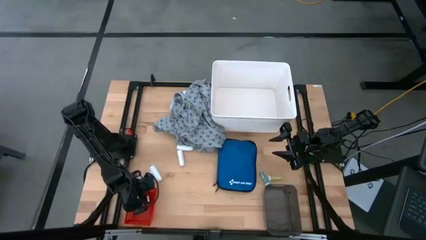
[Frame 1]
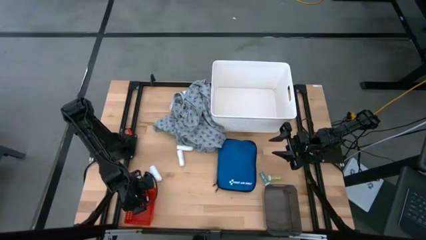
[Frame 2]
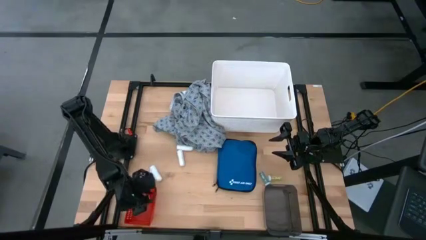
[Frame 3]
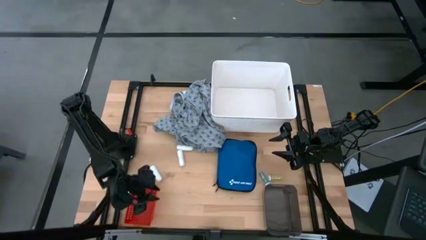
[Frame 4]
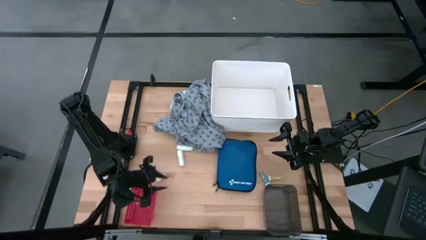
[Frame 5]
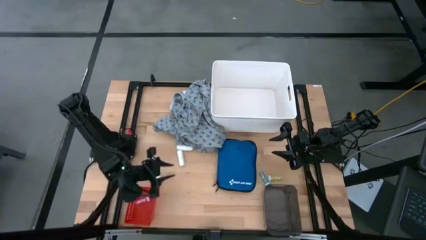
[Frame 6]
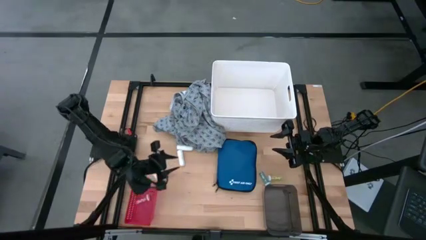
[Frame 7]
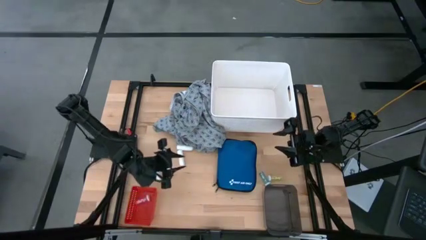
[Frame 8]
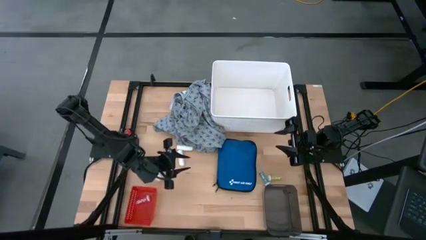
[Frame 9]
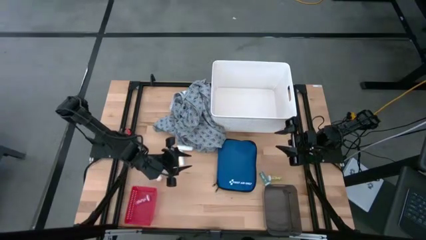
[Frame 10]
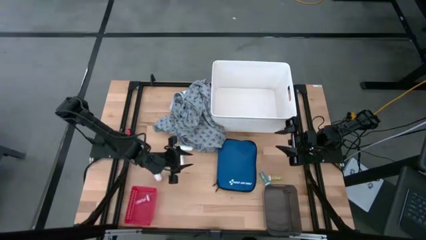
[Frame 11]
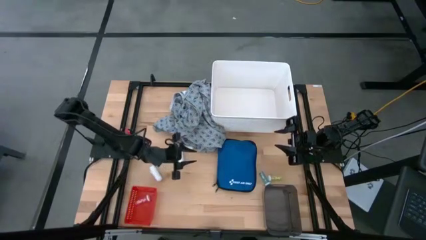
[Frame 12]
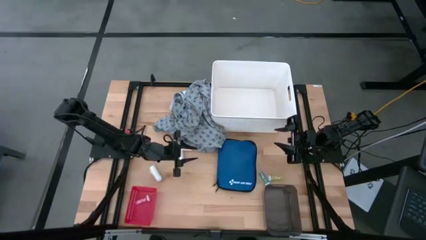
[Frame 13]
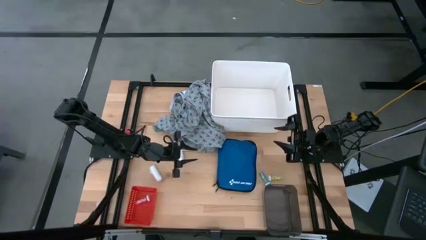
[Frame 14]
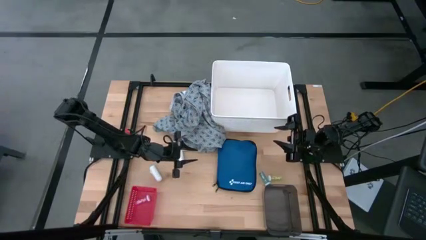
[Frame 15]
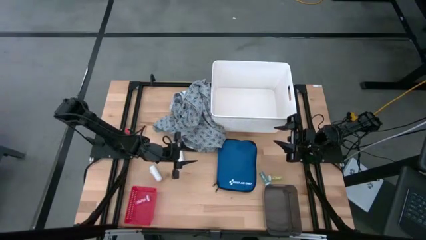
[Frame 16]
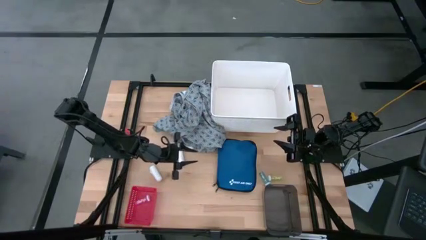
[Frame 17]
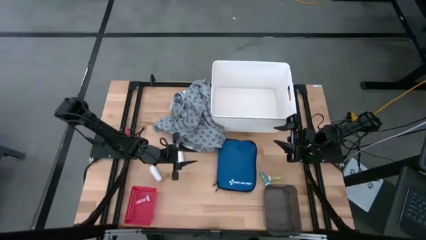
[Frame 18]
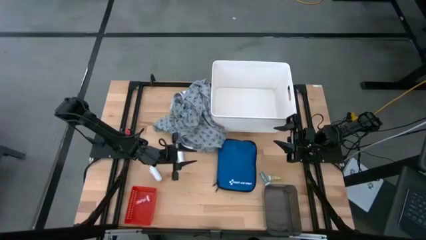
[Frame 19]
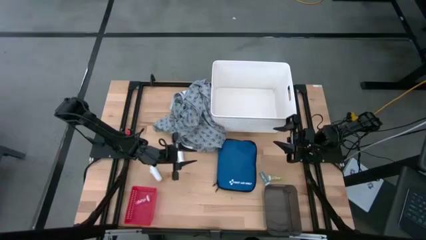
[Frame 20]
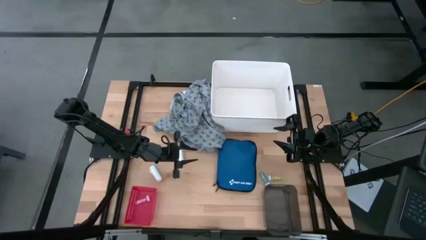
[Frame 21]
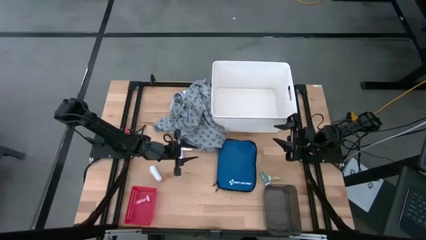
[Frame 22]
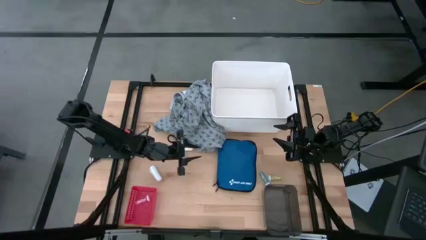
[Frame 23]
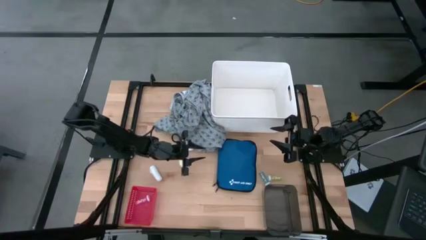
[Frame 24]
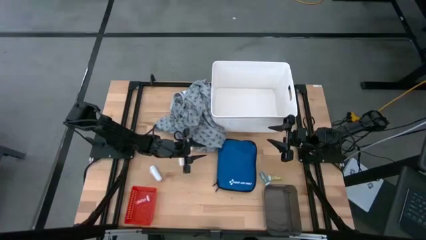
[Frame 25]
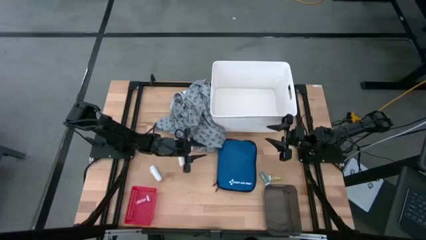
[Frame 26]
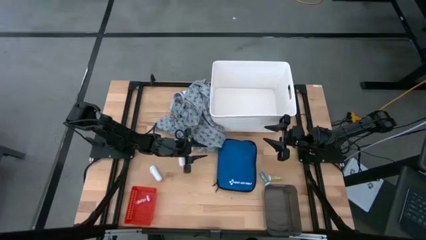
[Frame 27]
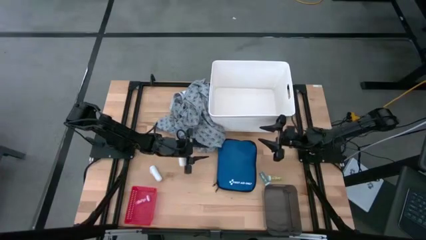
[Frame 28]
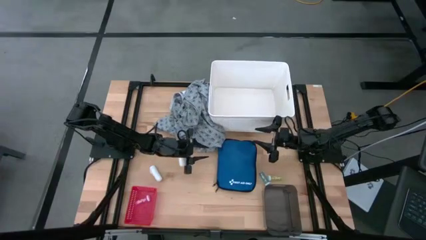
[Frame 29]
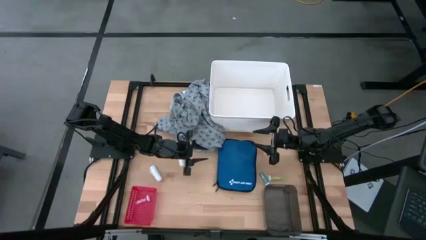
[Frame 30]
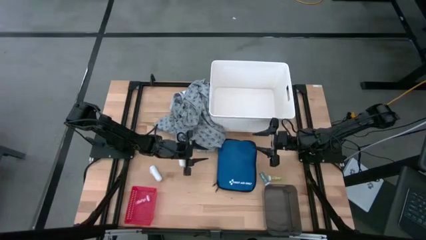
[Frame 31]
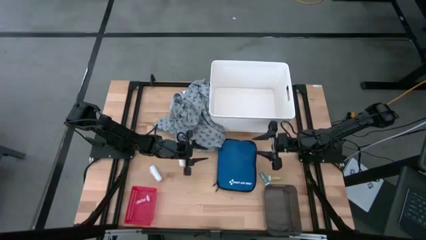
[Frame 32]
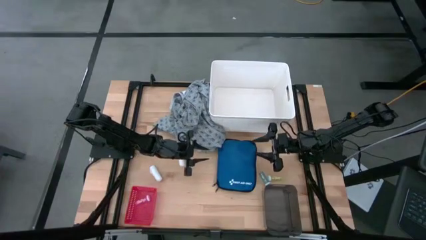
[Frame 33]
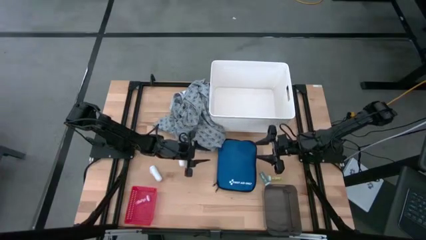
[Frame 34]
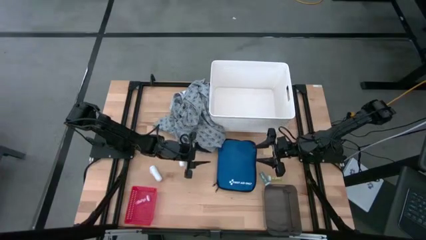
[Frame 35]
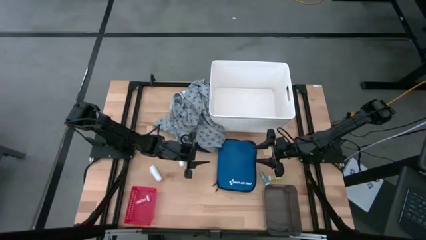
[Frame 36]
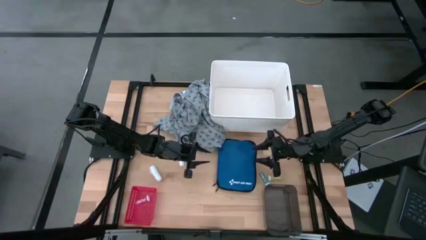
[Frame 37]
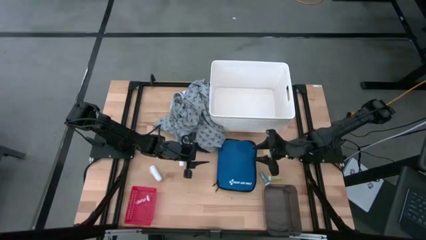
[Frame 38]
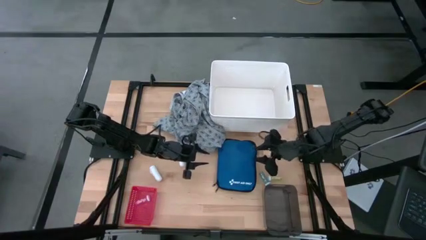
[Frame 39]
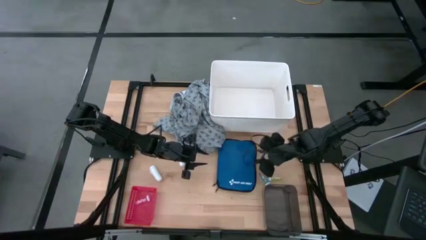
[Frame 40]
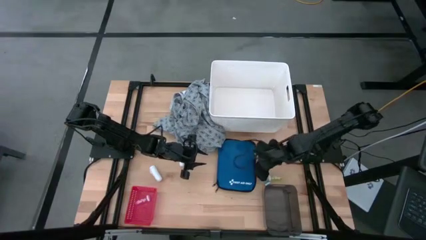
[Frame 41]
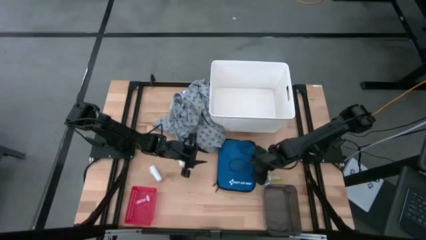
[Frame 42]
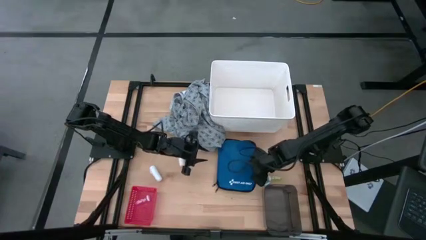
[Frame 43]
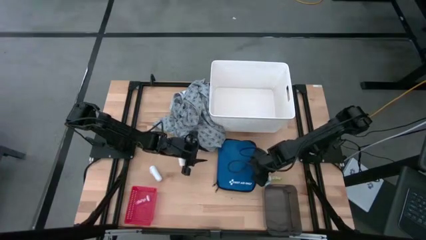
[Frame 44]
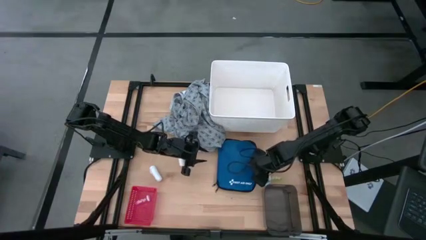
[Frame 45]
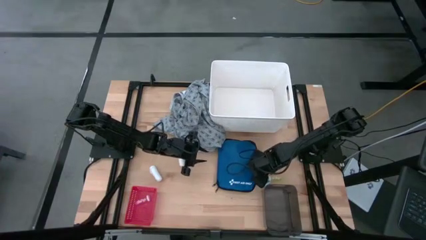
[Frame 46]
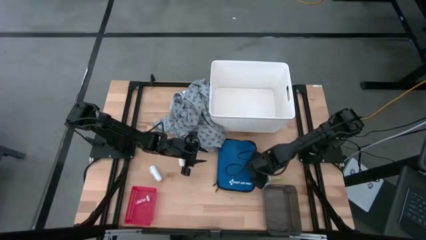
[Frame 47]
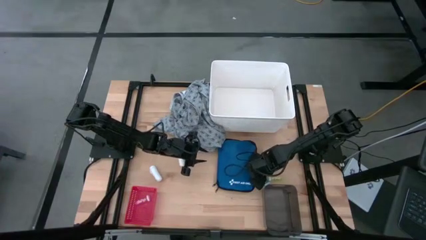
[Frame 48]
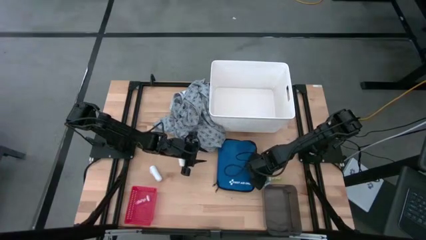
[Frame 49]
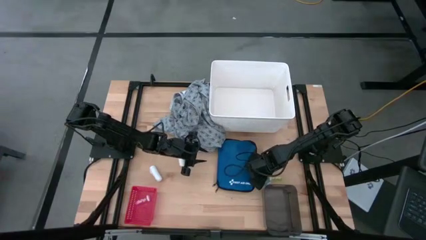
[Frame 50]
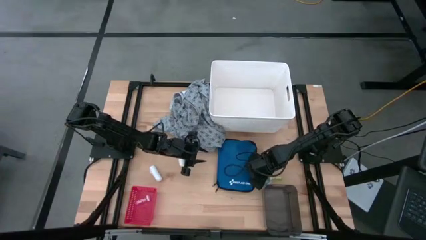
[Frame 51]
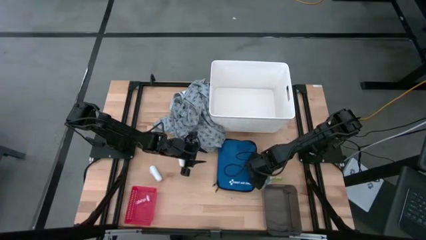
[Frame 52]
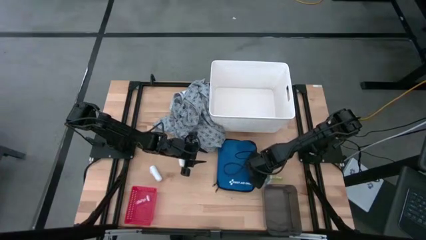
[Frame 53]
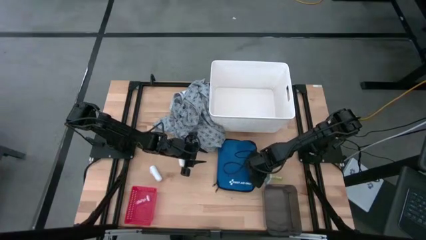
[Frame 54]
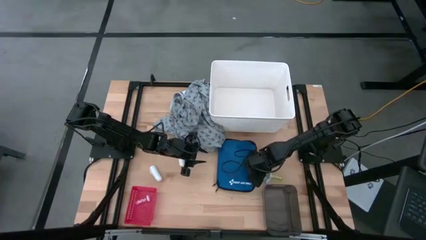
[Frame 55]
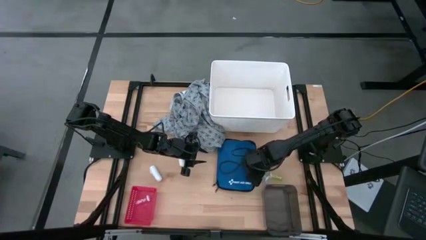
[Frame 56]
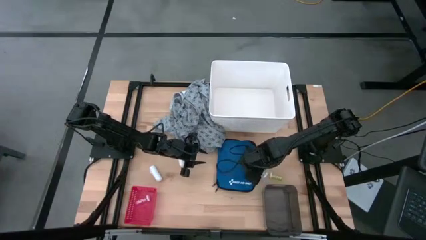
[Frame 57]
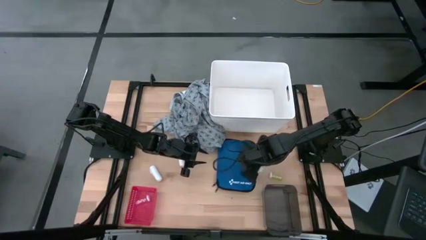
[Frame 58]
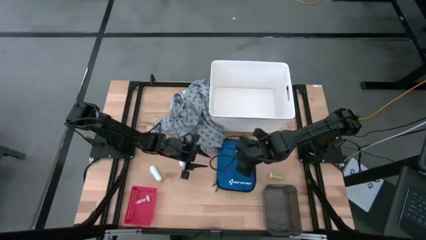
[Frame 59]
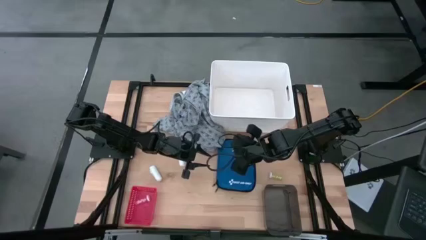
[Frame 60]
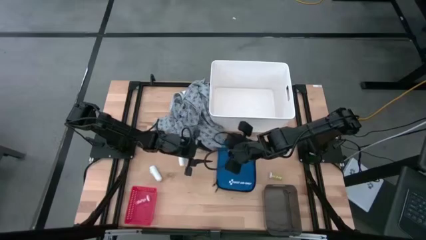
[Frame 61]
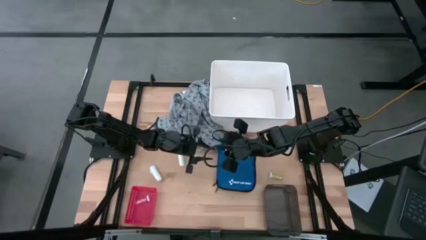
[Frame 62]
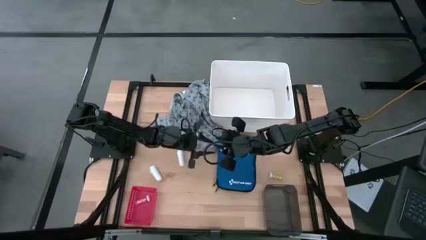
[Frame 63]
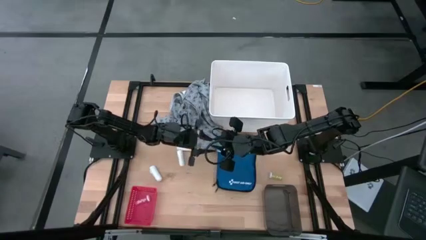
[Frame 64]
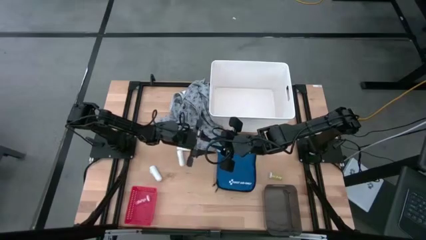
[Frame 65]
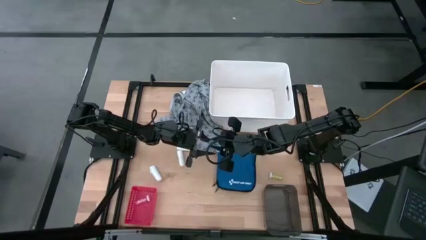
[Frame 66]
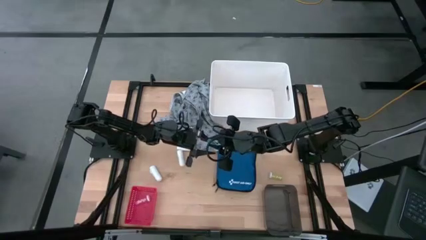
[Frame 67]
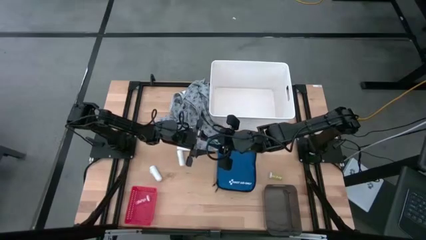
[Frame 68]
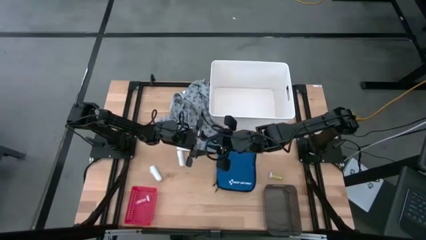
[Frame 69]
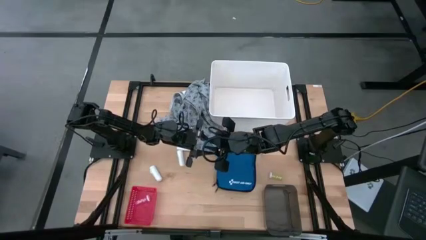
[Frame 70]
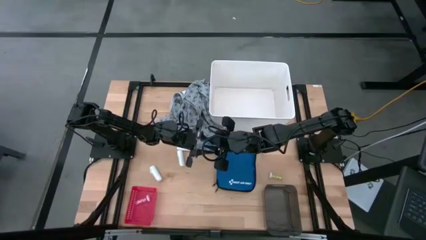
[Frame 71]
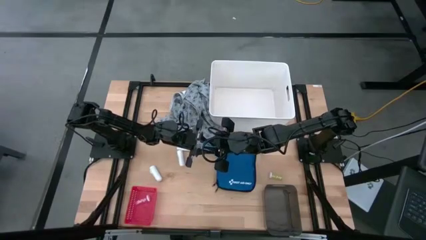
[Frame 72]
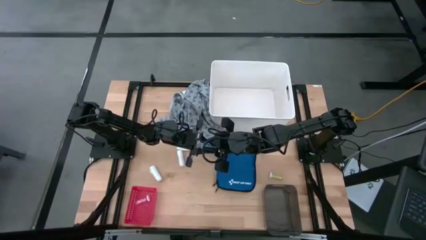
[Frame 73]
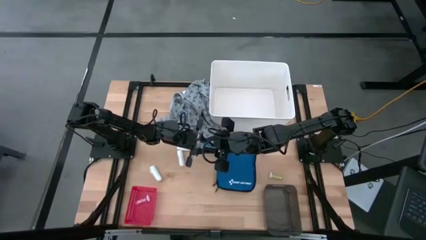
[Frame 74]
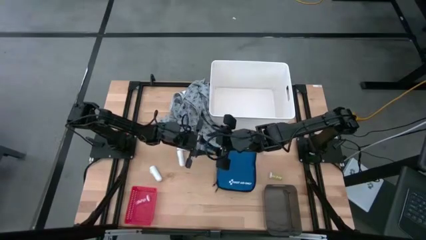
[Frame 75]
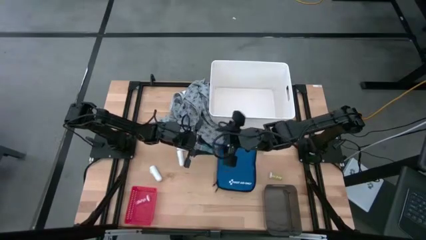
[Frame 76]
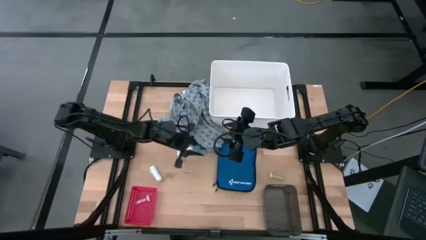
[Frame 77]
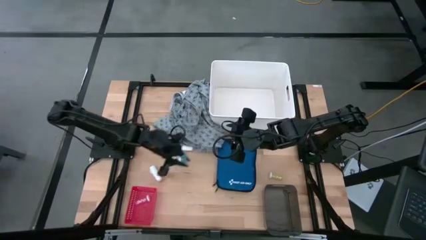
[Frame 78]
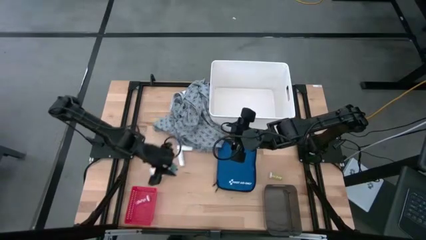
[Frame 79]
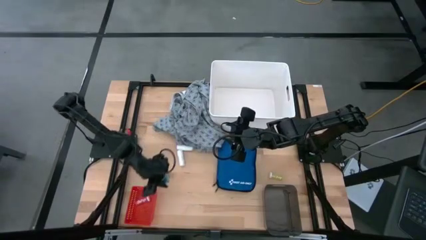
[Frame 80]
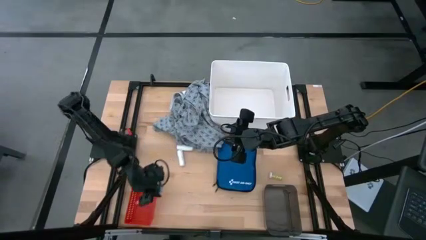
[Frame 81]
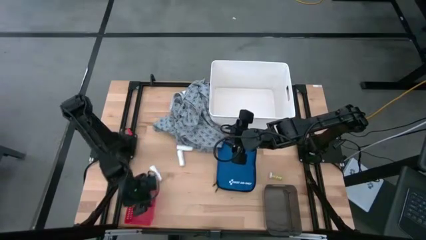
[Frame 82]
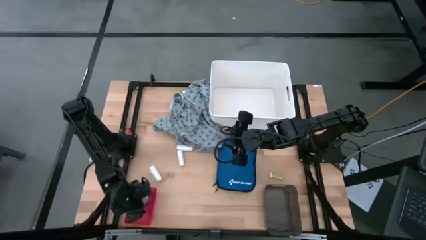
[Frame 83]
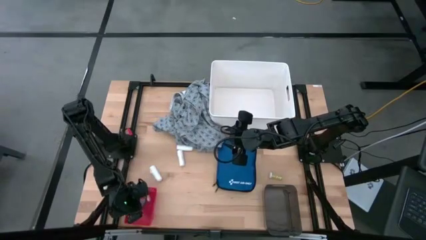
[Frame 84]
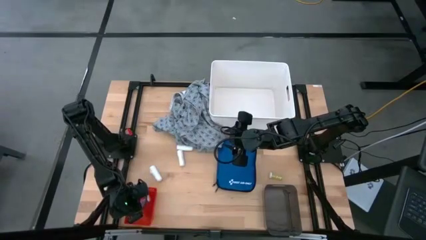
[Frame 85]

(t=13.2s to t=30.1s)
Task: Pick & Place Medicine items
Put the blue pill bottle into the red bin
